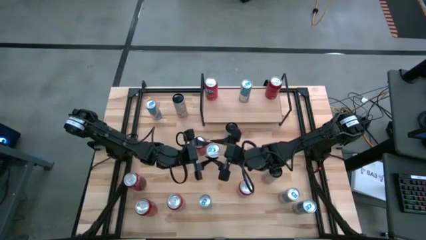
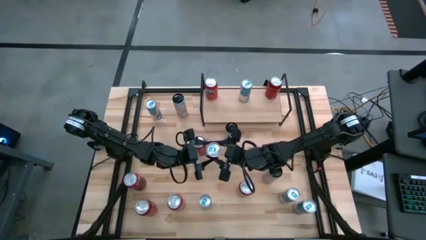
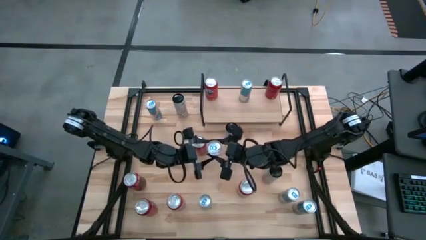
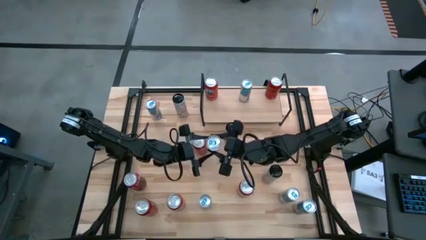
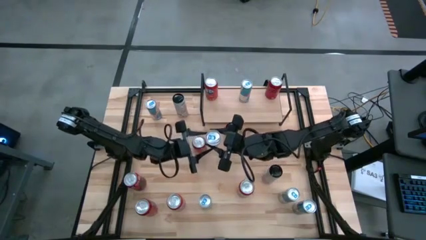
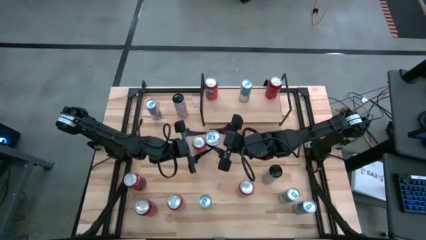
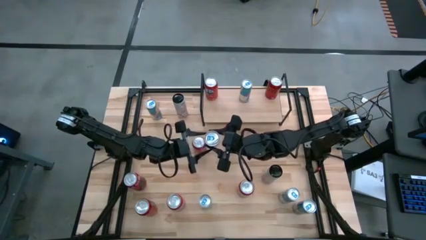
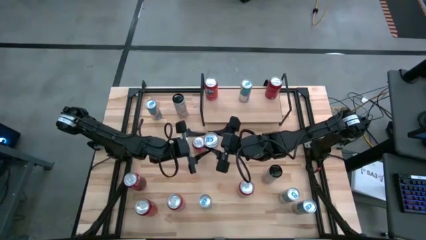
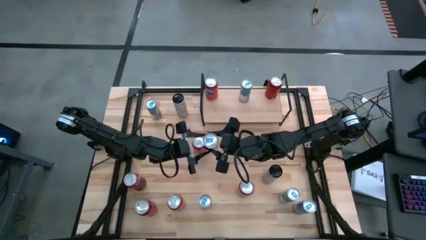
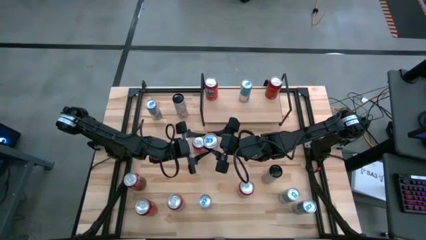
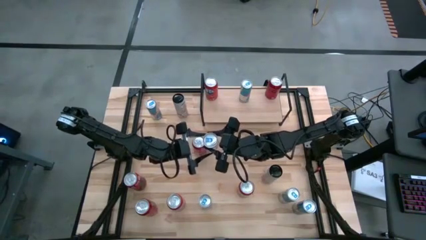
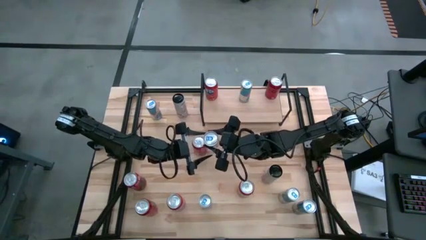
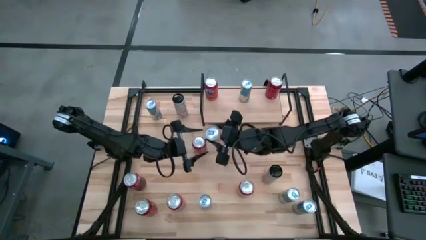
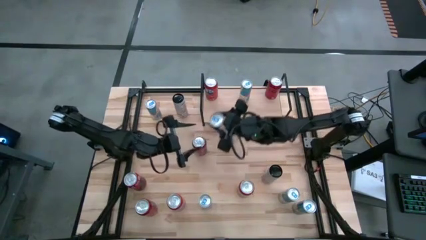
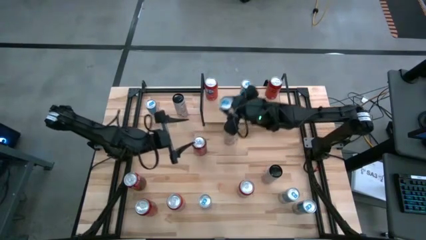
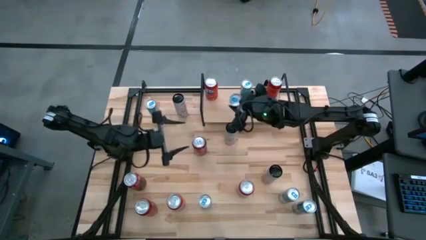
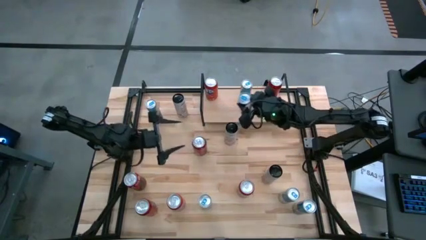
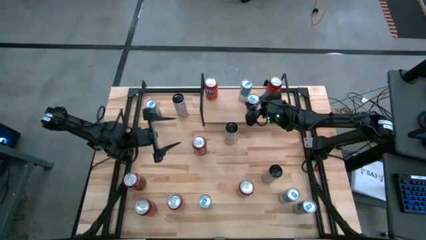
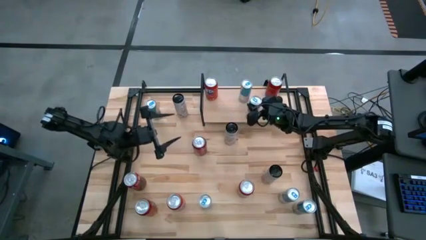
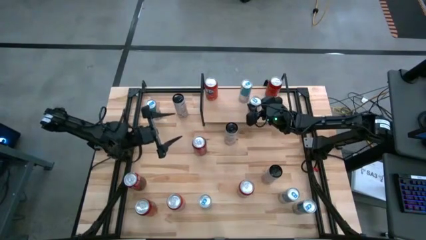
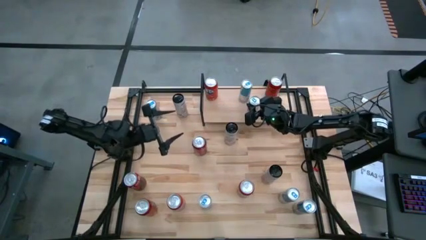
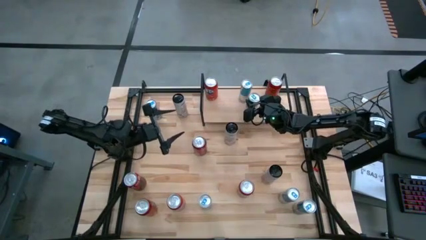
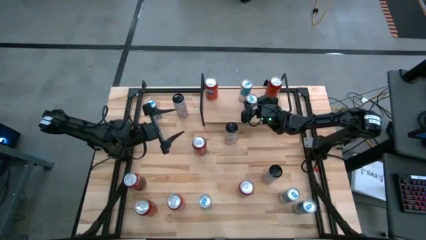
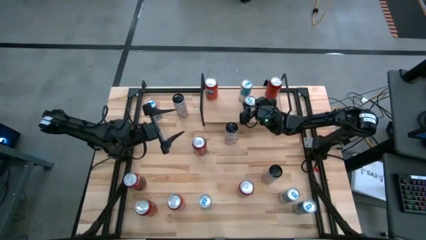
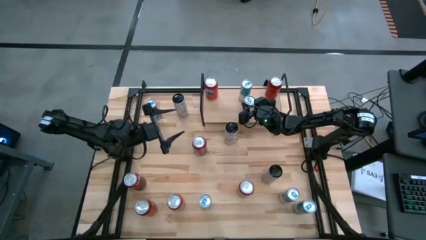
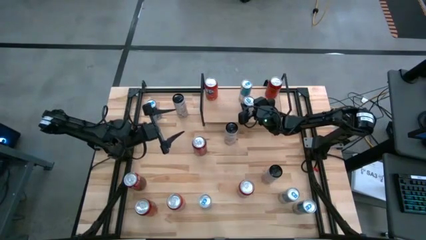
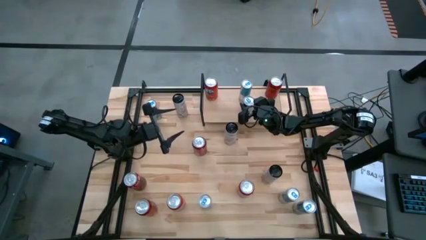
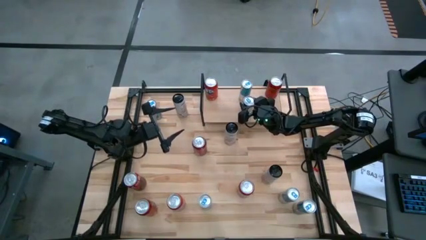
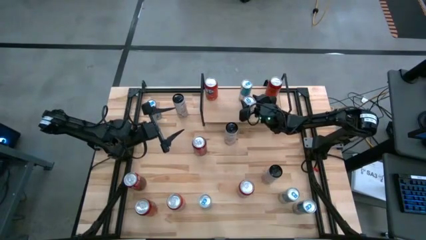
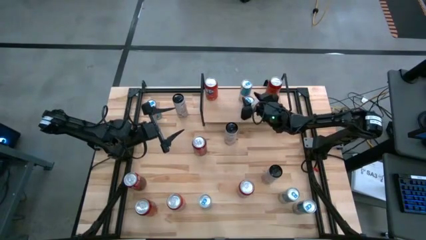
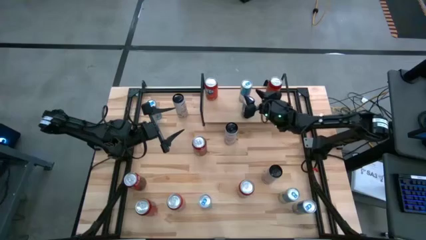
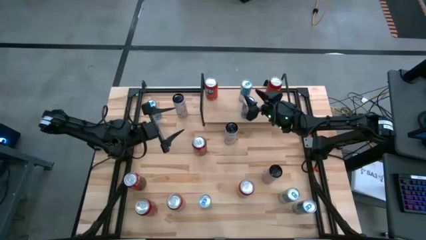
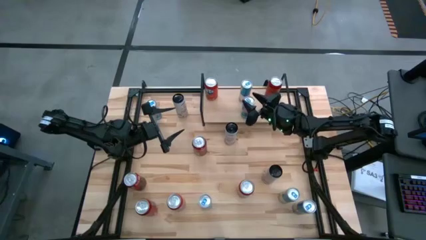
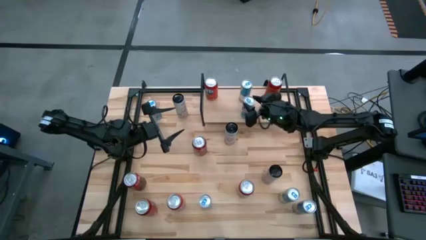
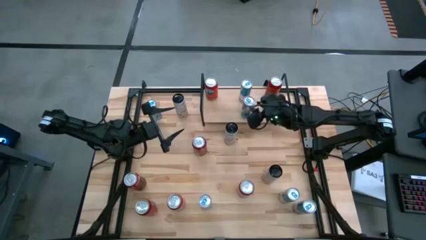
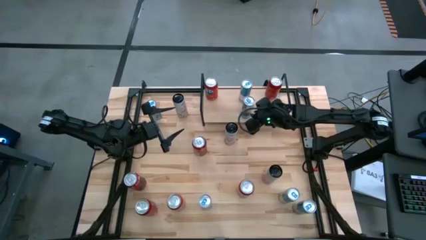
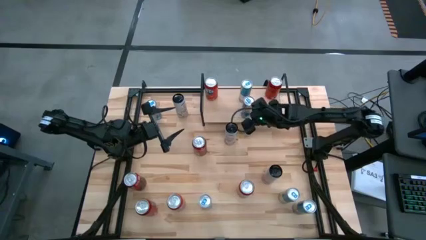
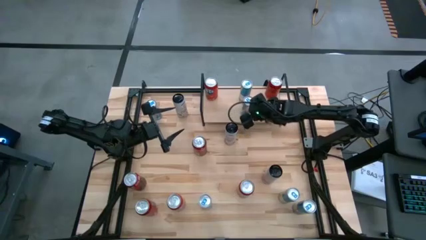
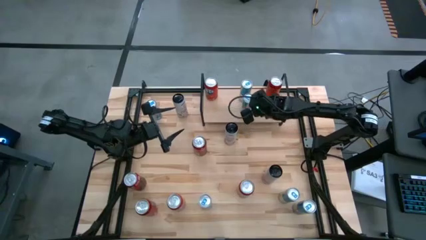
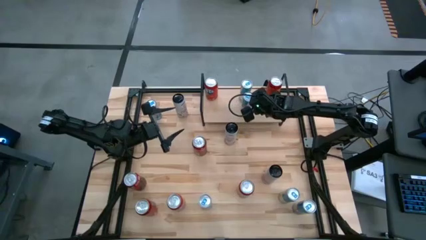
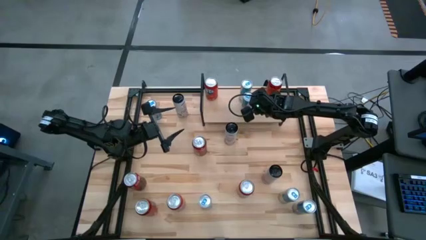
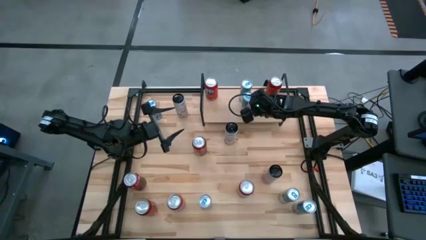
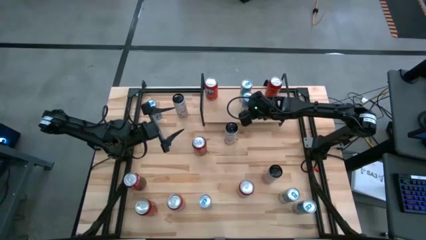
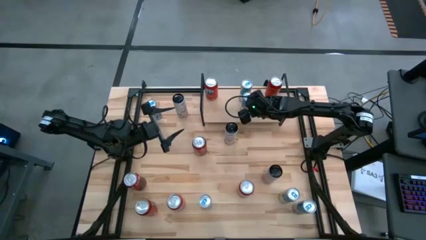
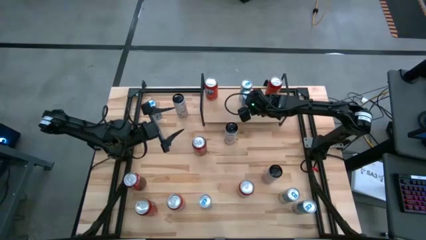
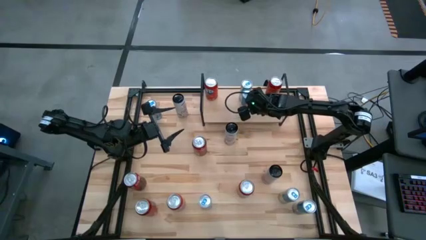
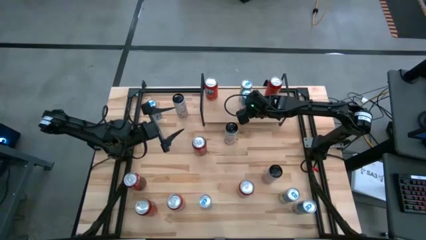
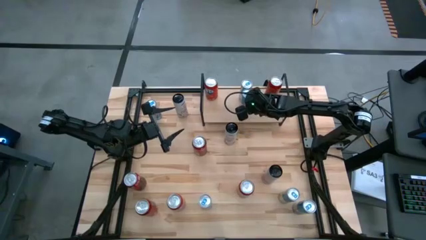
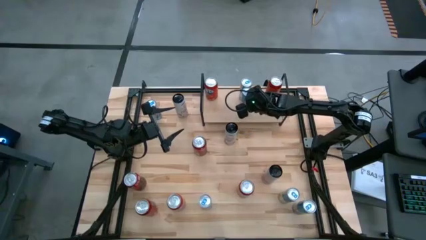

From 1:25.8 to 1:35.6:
Task: Place canned beverage on shelf
Put the blue soda can on the shelf

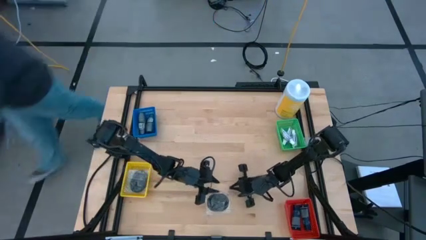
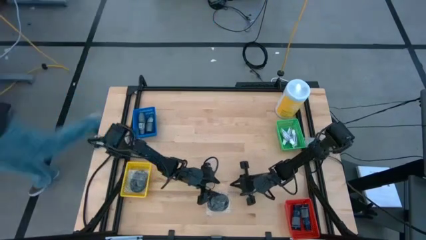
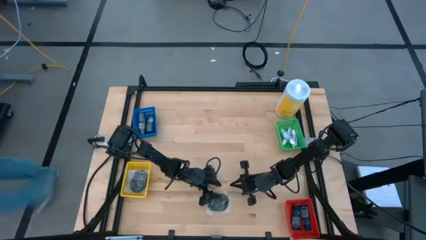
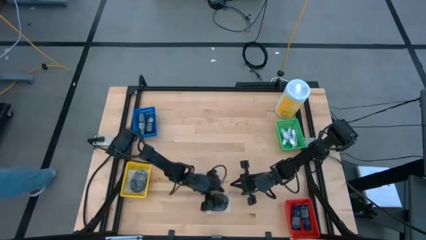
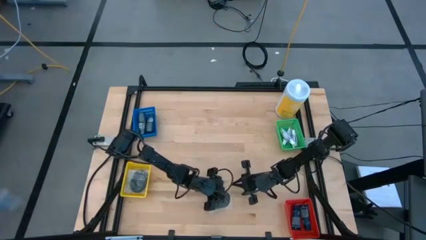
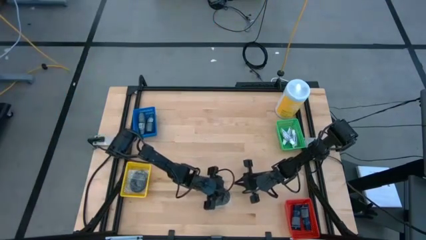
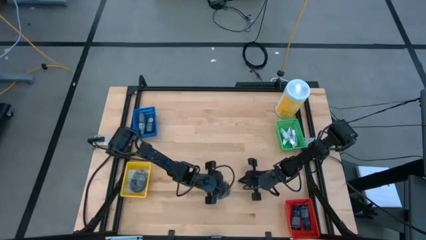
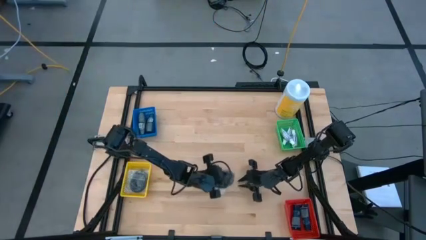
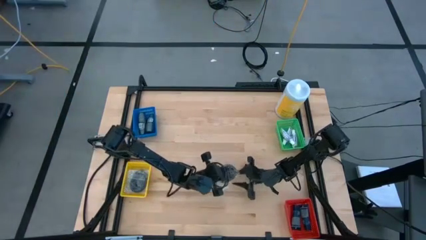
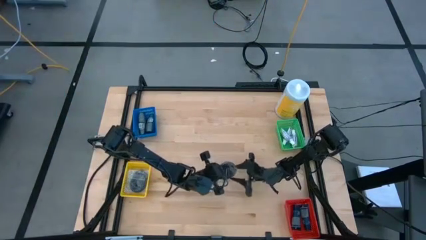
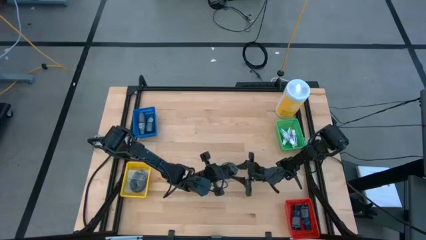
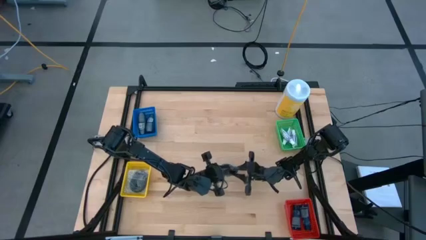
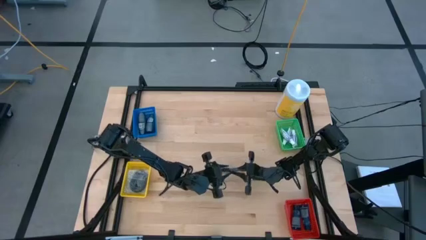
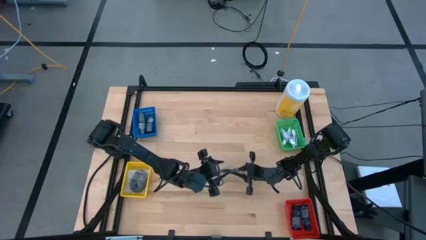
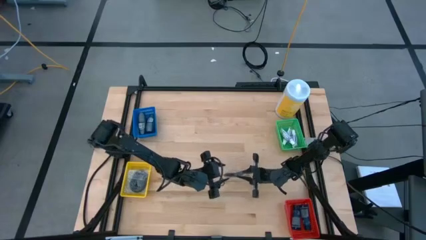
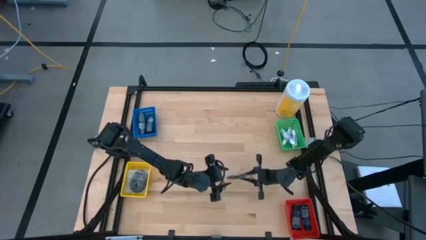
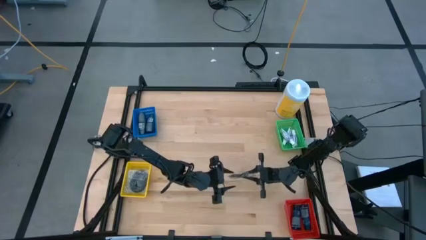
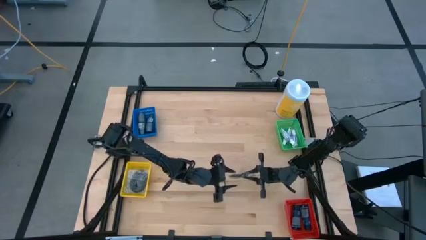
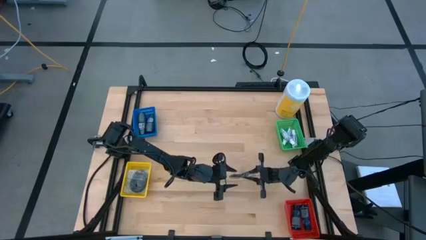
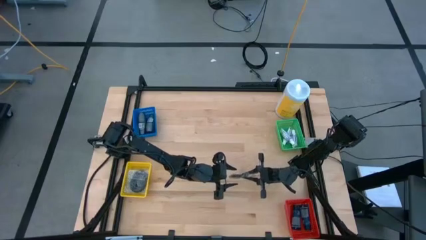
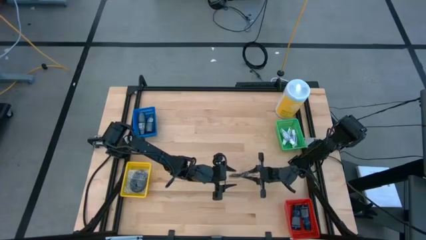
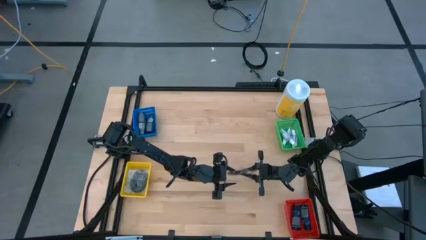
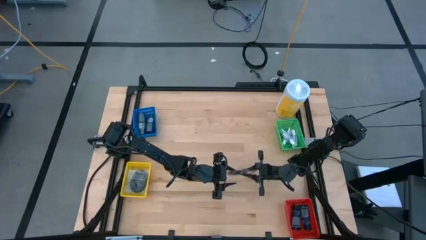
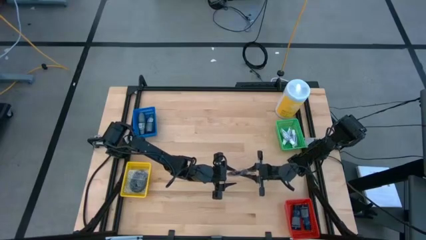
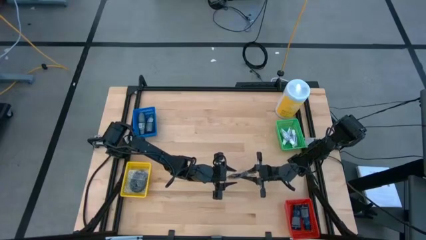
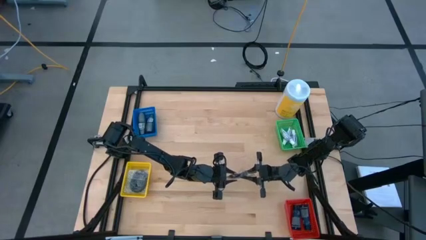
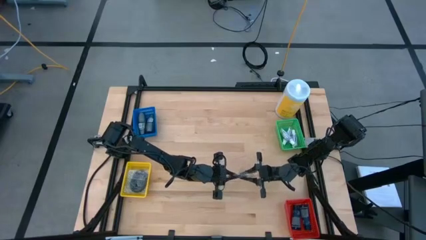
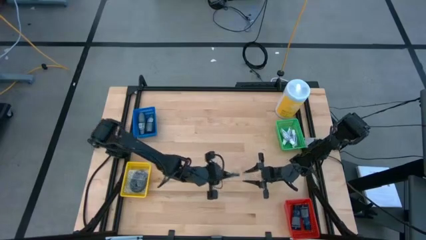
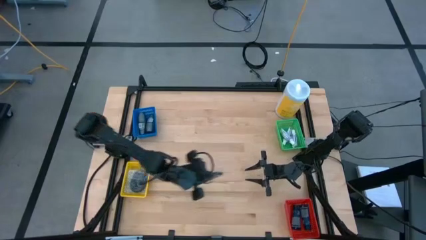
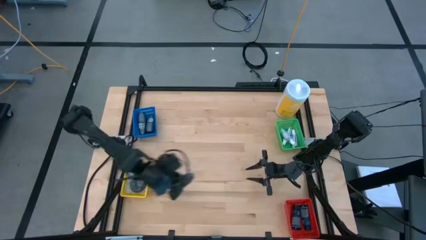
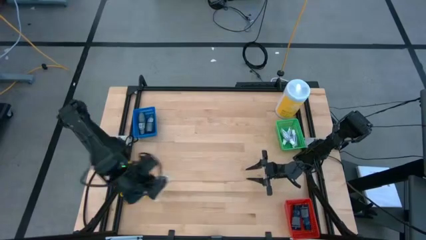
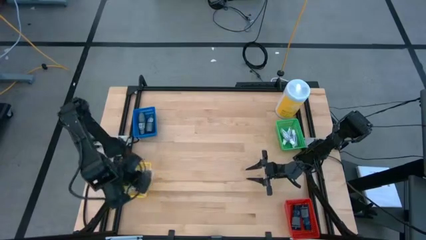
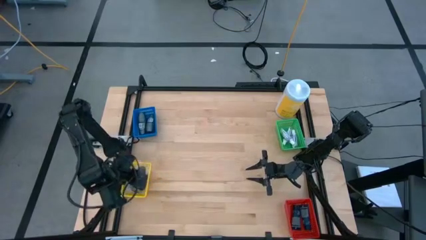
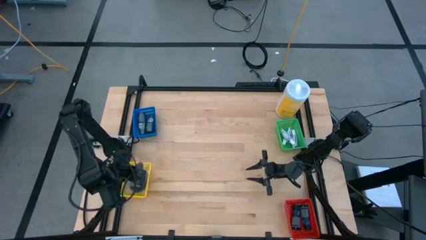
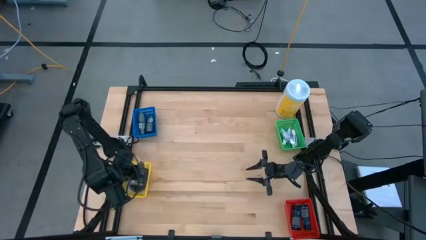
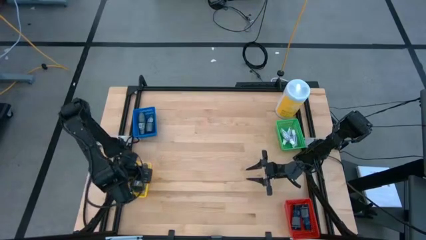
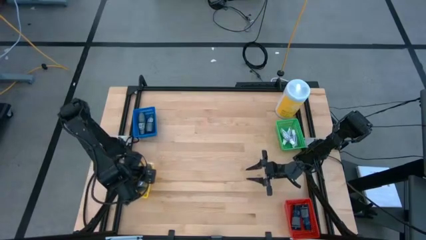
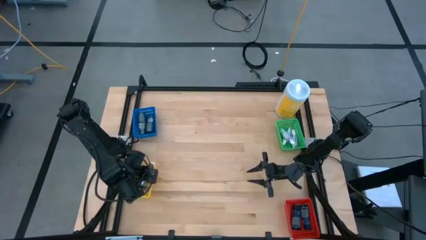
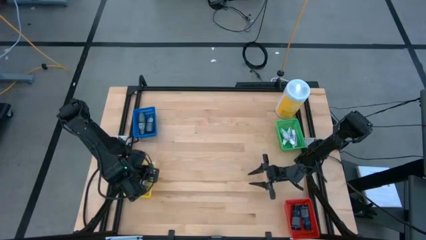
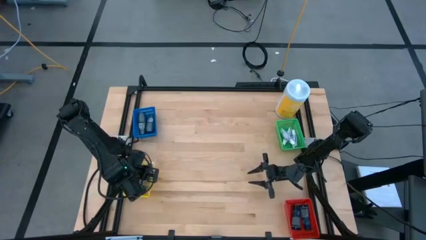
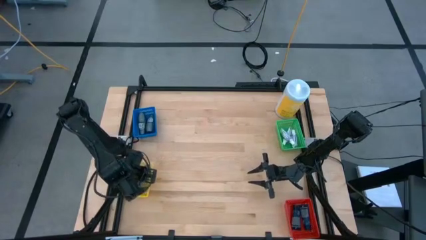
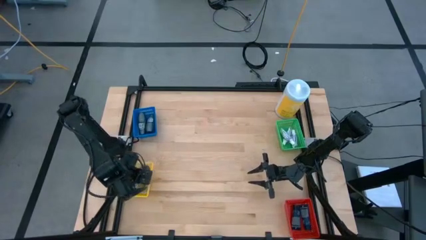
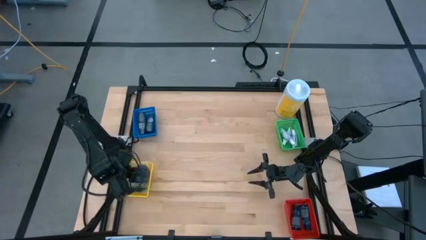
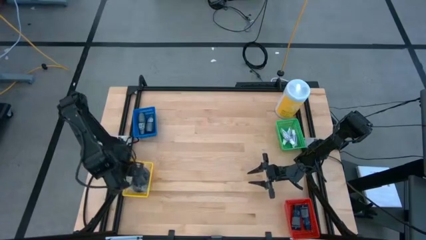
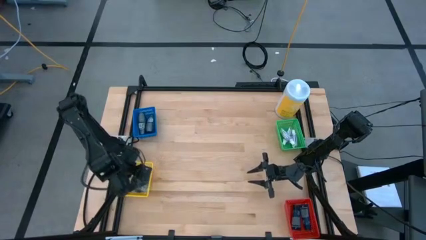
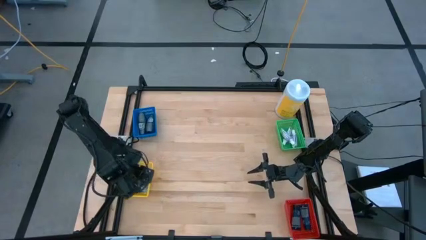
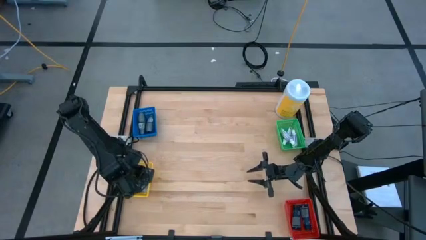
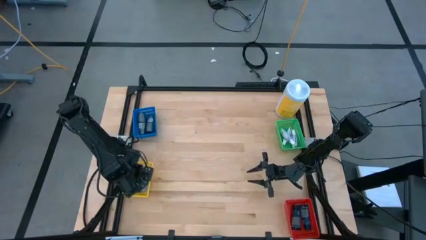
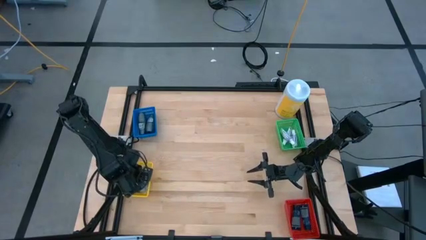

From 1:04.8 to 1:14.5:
Task: Pick & Place Travel size toiletries
Put the black hairbrush into the yellow bin
